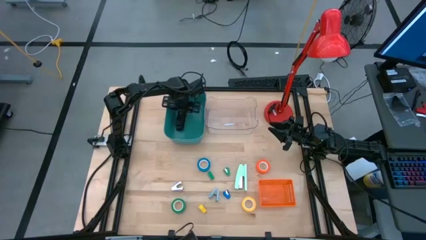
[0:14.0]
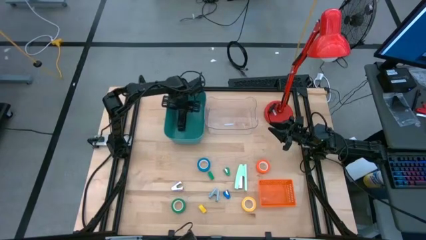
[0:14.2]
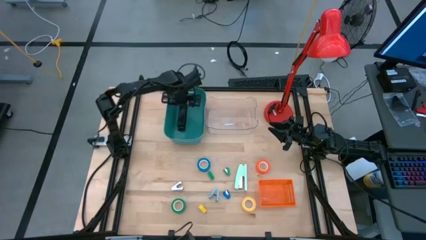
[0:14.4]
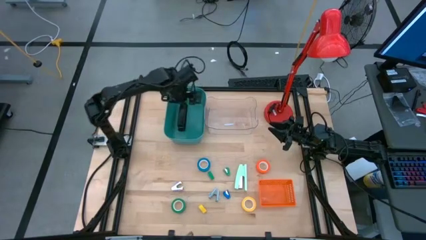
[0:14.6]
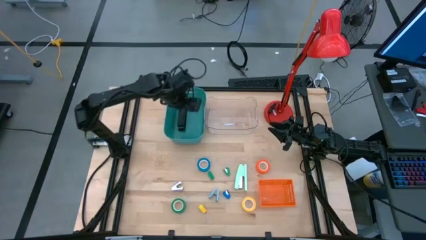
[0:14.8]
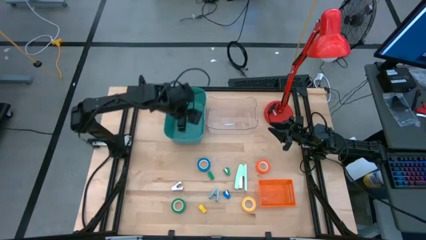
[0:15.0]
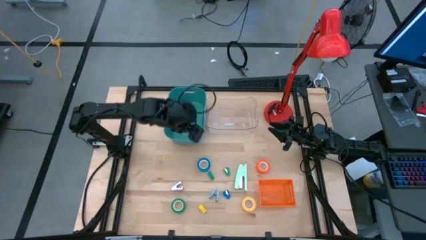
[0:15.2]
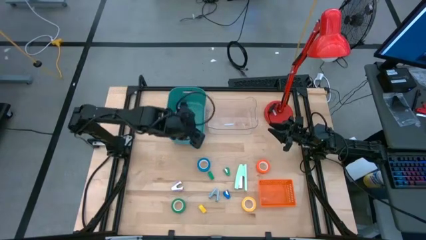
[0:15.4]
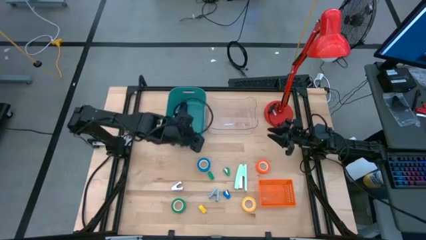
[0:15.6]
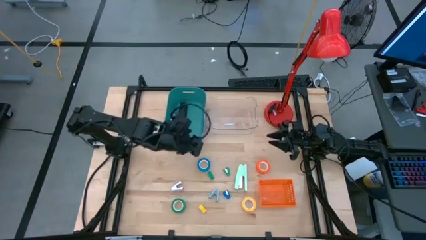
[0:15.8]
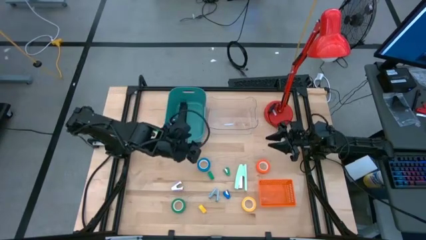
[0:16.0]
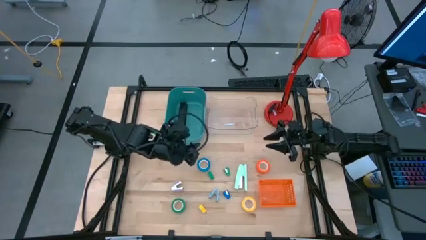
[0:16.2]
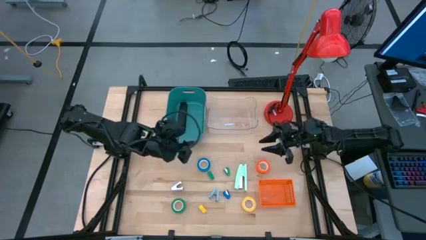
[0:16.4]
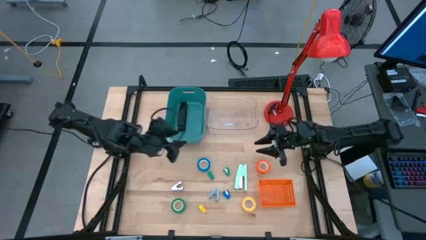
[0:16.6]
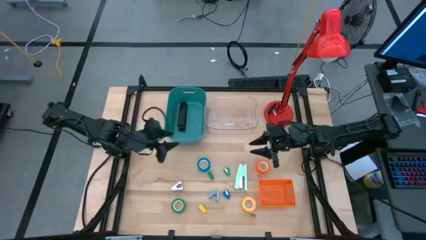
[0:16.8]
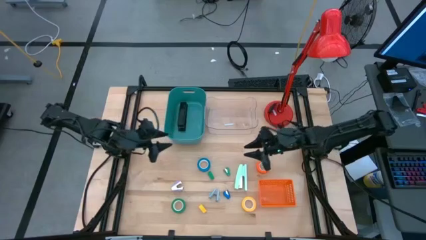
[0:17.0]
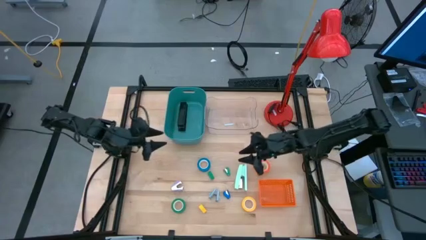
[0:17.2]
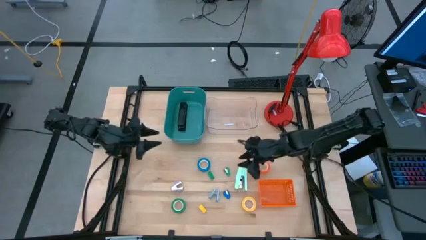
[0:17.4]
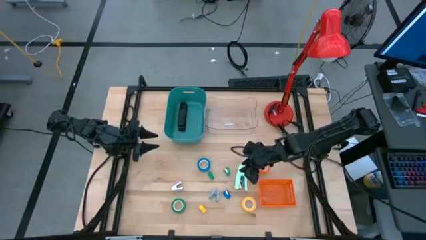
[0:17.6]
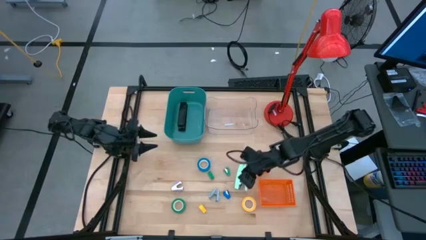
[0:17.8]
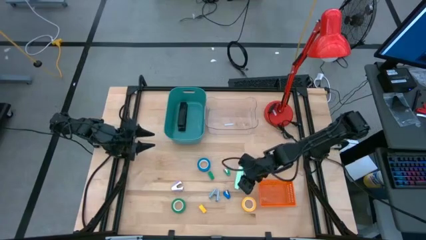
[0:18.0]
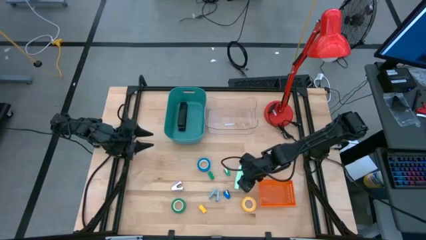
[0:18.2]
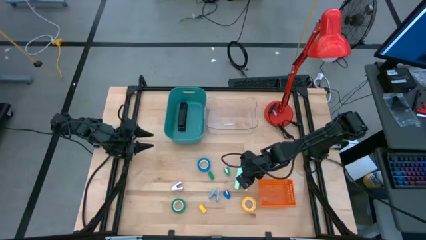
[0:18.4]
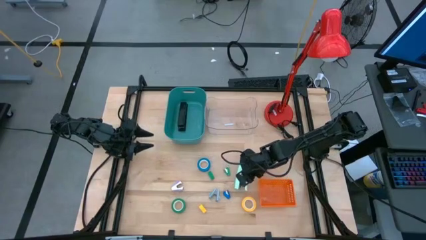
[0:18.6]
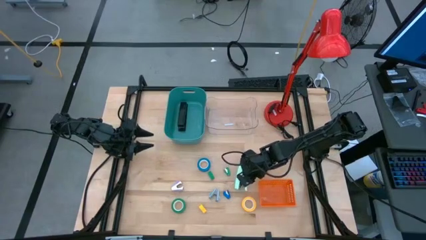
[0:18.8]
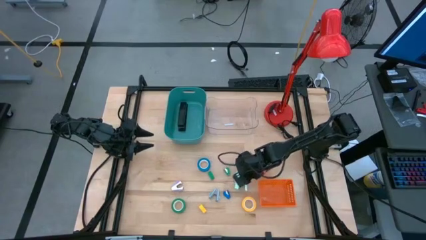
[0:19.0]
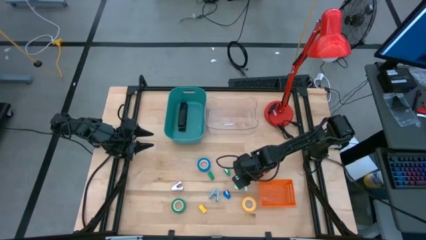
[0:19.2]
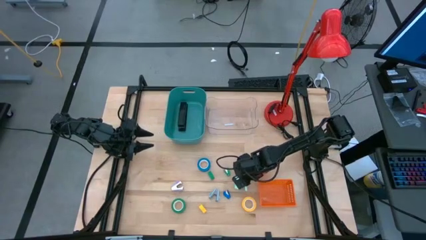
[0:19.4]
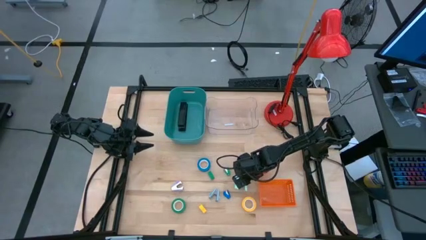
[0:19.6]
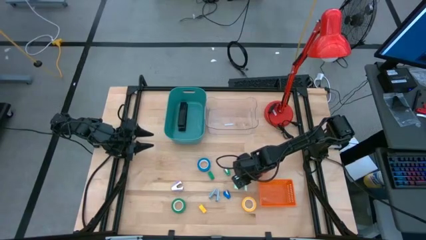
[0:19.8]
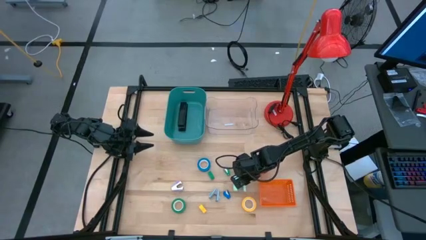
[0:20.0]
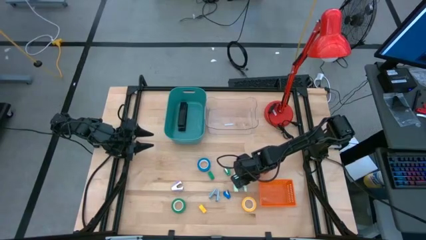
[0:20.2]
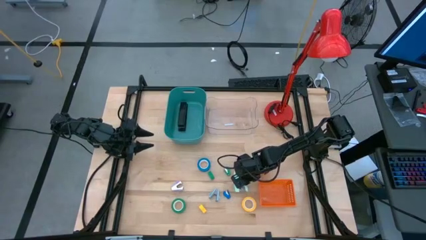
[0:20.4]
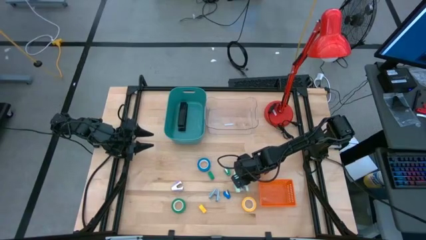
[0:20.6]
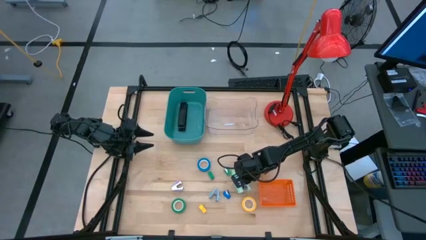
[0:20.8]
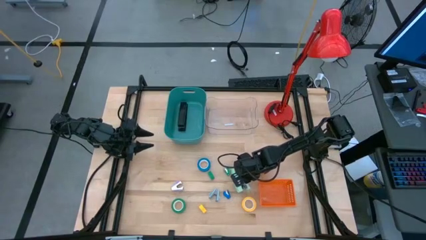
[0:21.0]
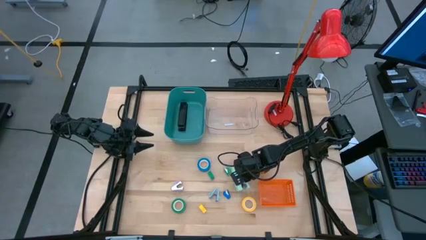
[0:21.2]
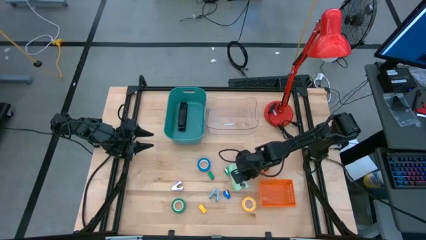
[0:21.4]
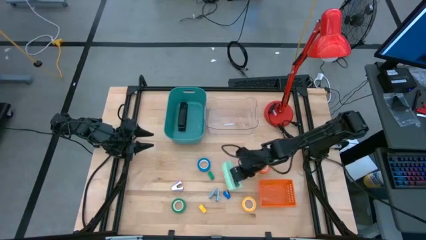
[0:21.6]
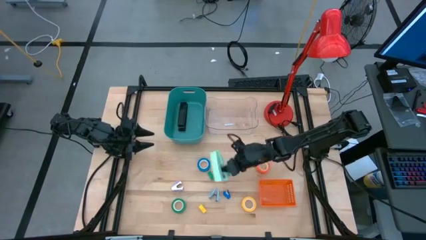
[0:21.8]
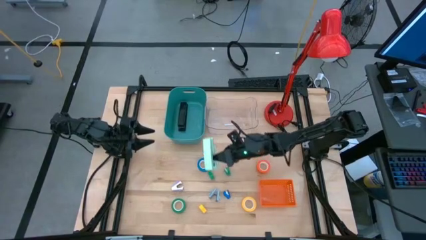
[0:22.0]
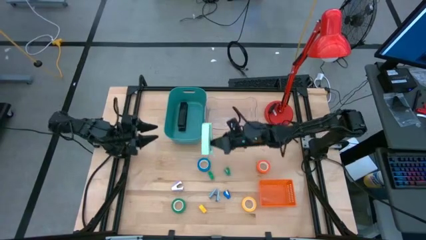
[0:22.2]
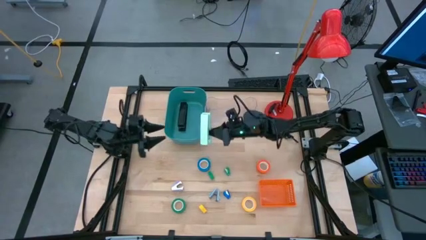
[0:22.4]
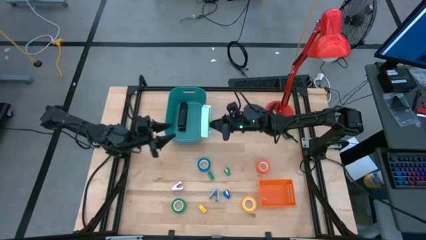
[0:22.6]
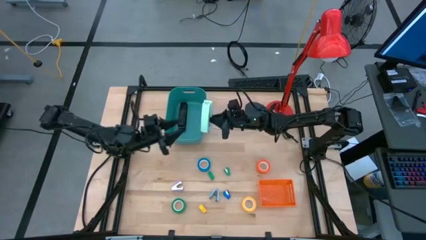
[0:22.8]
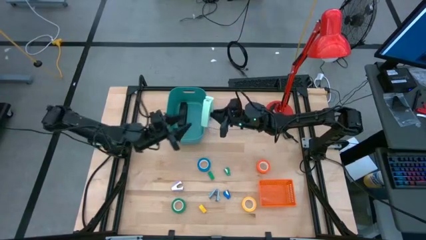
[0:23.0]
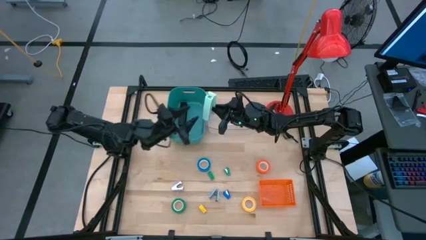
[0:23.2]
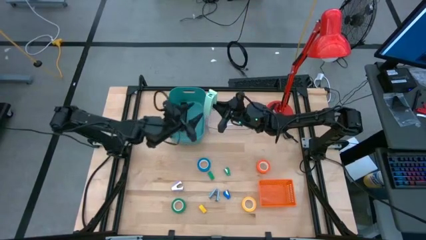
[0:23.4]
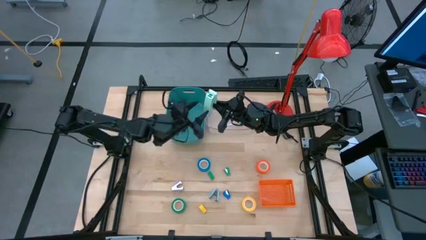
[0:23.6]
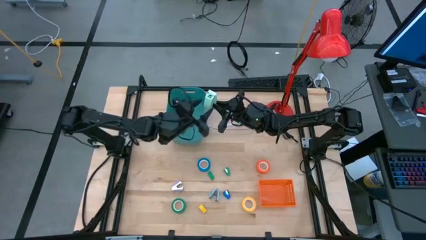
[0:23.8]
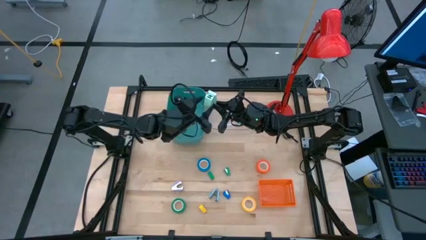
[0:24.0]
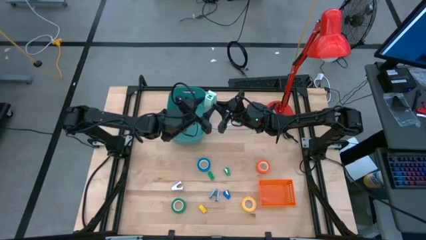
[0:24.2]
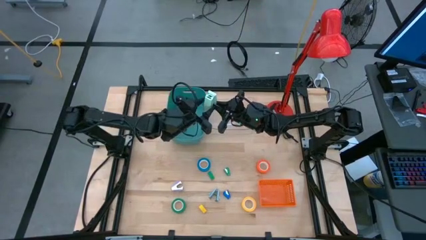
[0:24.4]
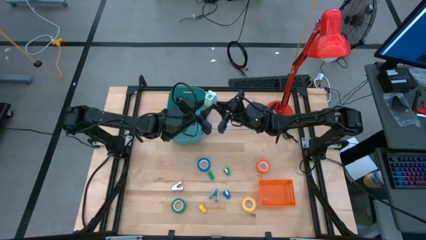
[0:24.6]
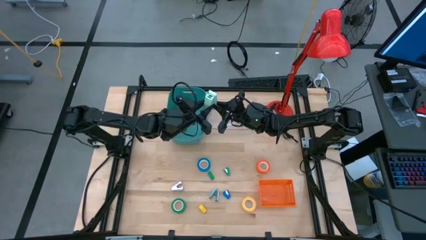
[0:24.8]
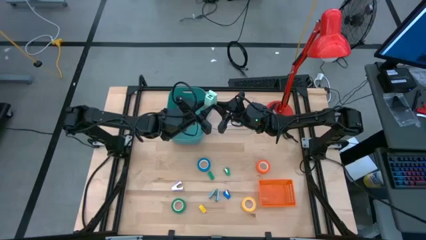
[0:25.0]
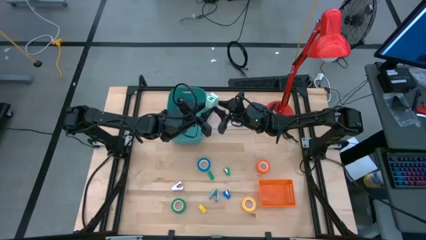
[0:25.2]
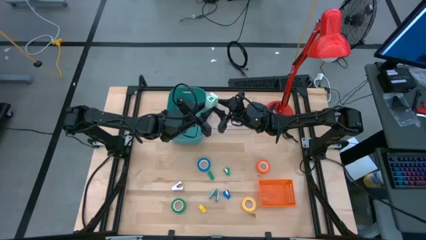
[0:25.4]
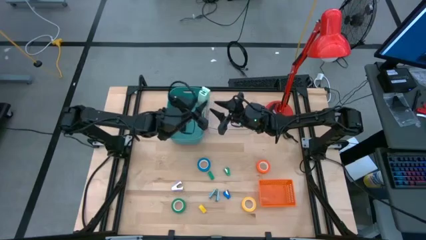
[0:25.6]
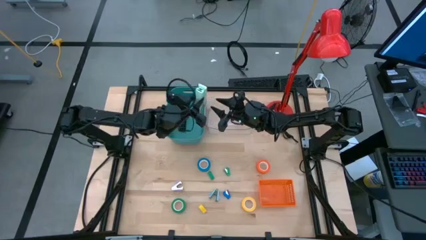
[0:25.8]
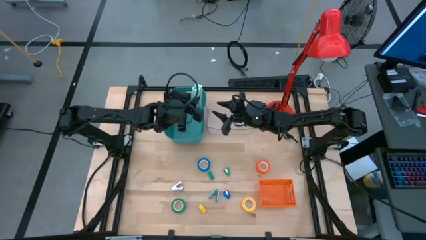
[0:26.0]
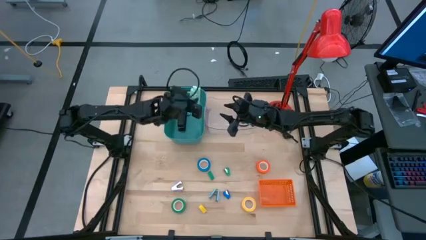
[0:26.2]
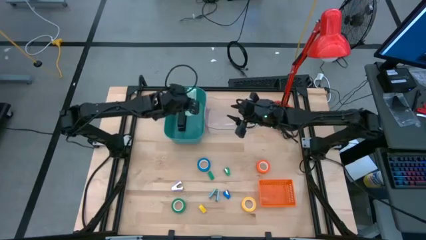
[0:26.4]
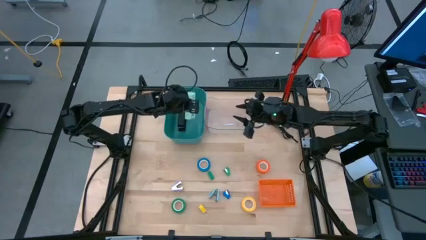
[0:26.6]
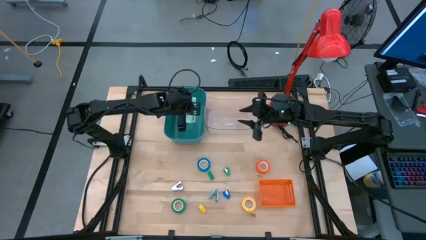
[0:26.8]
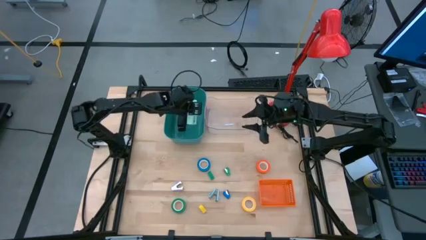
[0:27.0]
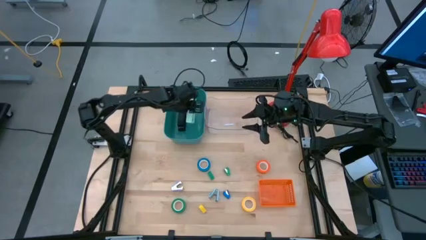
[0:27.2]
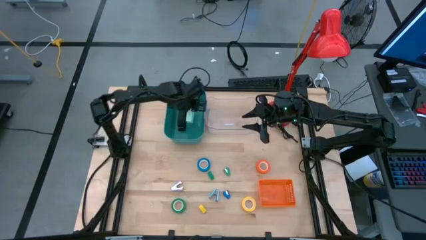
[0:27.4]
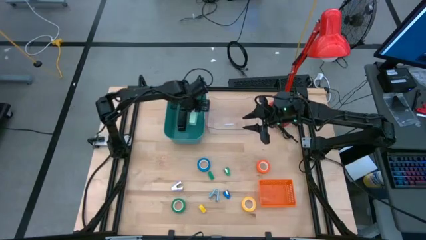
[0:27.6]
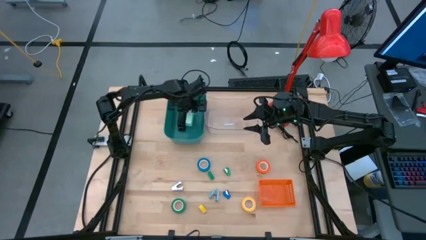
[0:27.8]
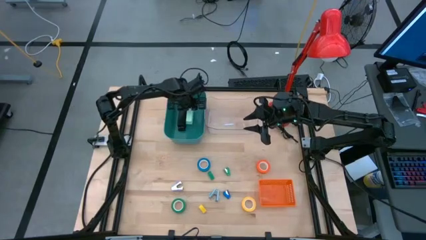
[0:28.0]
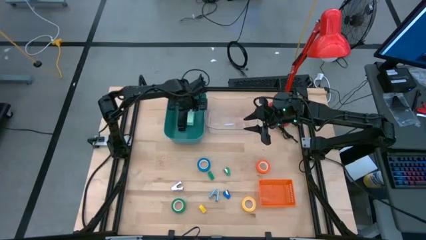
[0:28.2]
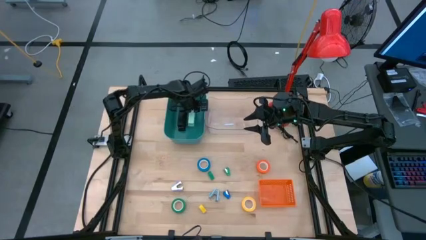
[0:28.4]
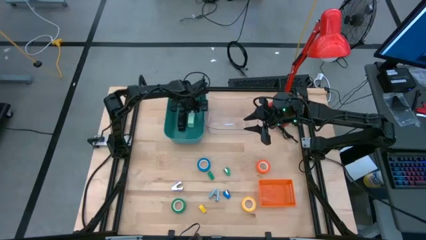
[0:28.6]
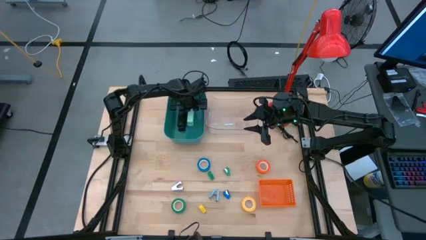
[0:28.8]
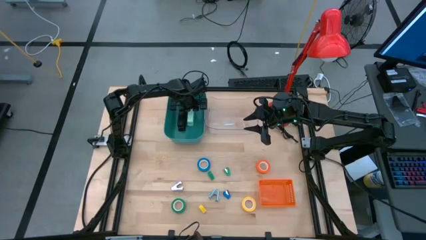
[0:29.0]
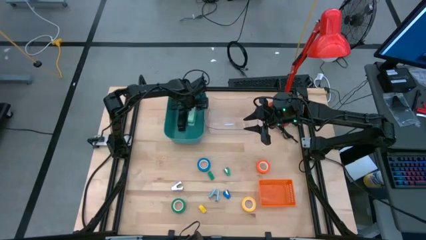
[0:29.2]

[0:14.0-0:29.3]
Task: Pick and place Stapler, Stapler remover, tape
Put the green stapler into the blue bin
